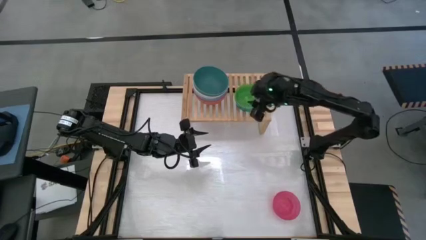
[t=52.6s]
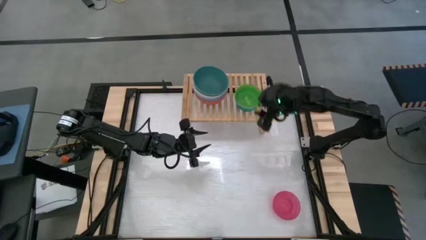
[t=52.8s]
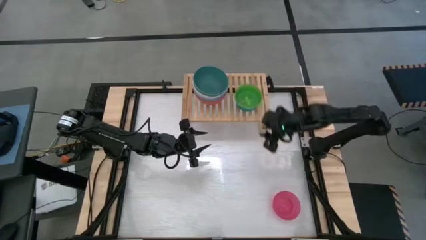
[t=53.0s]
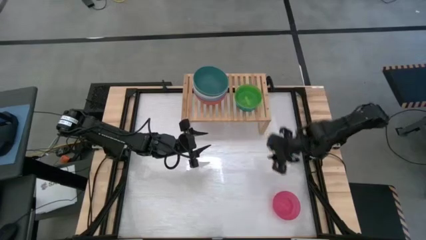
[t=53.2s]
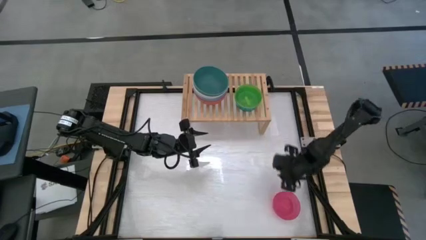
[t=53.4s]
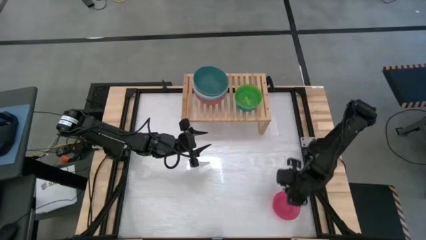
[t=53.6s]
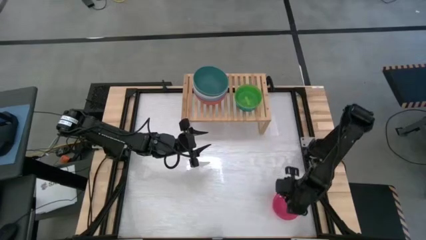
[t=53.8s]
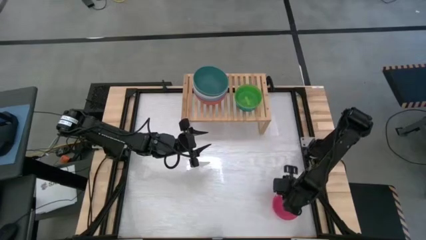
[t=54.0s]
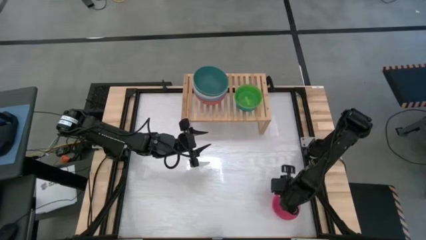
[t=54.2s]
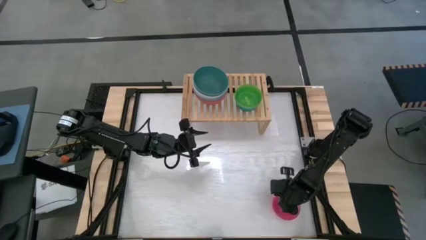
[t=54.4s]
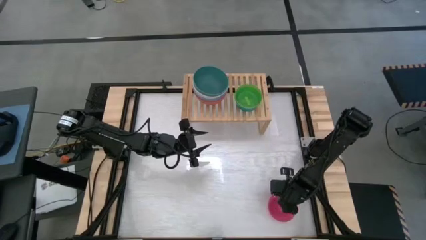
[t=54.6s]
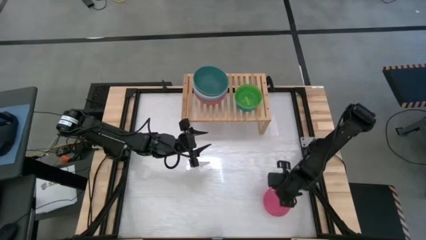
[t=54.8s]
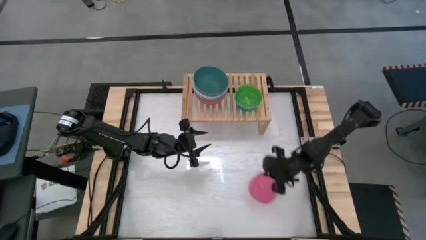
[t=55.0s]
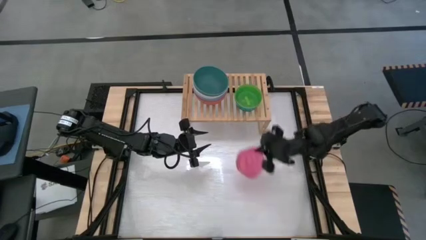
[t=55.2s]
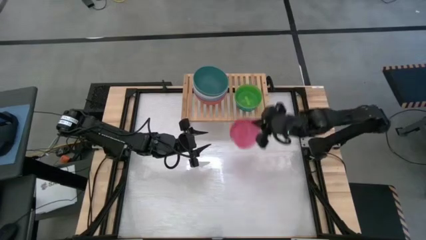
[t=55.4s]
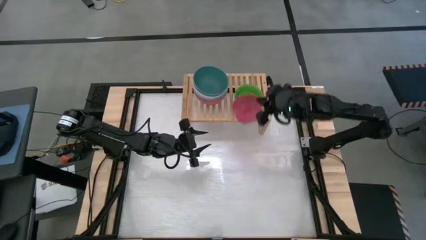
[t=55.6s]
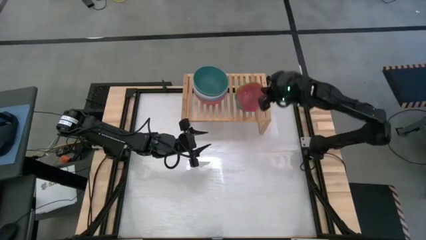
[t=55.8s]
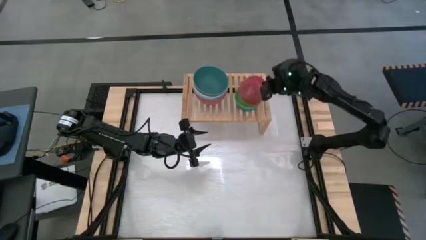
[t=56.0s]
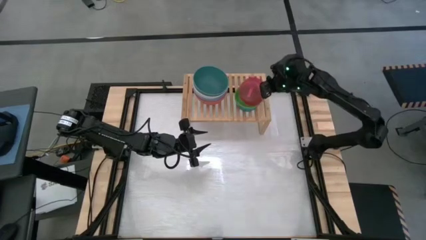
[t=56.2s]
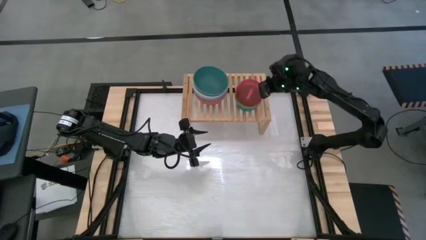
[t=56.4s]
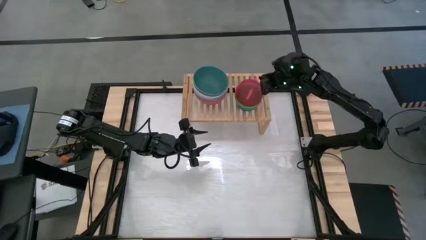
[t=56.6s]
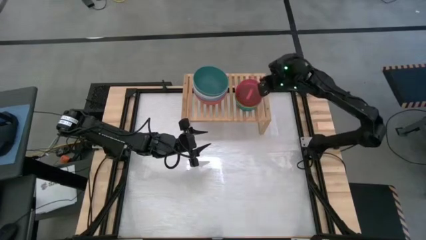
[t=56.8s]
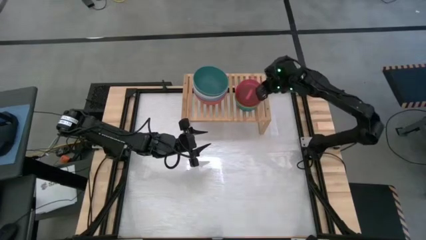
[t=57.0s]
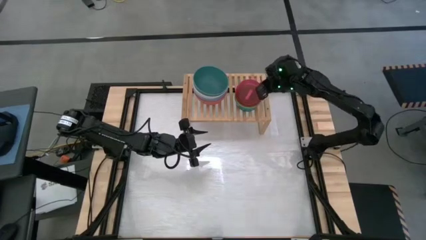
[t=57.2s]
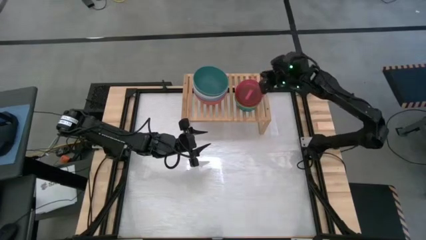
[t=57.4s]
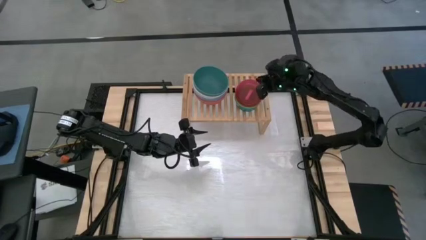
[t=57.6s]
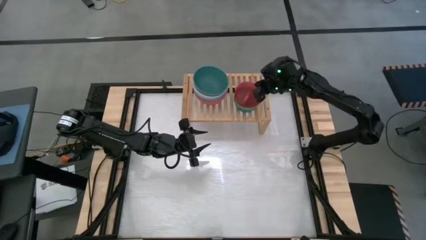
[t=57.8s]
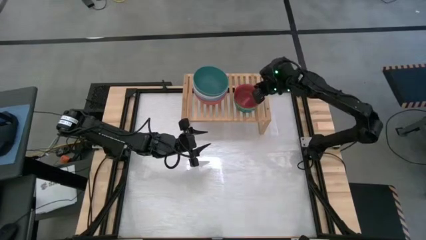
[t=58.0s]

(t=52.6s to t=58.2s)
Task: Place and stack bowls onto a shelf
Stack the small pink bowl on top of the small green bowl on the shelf

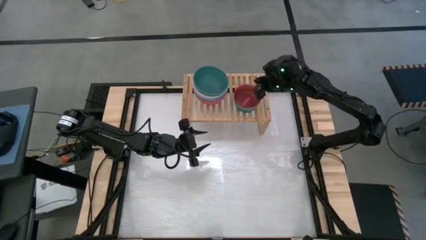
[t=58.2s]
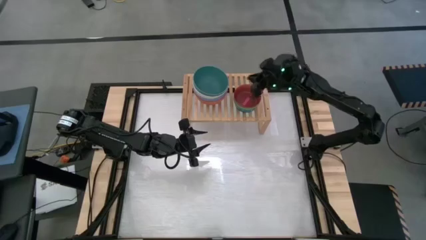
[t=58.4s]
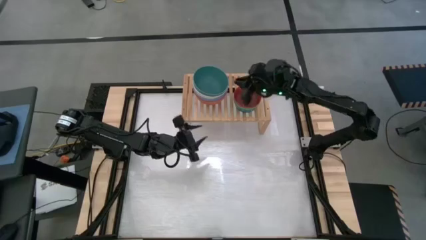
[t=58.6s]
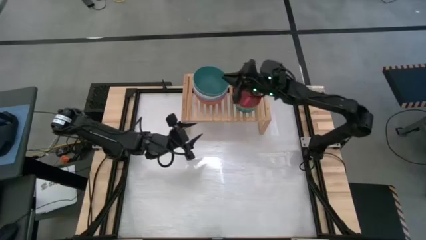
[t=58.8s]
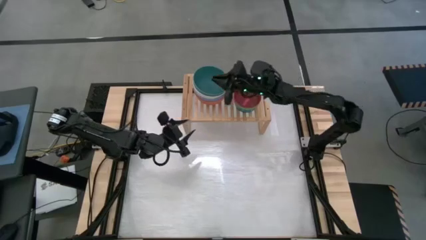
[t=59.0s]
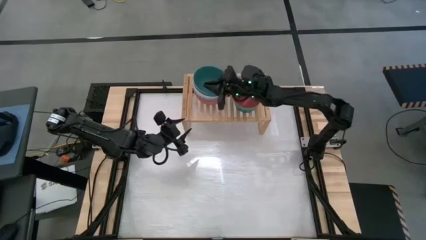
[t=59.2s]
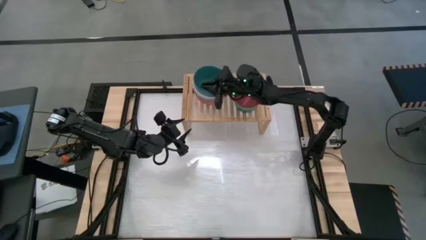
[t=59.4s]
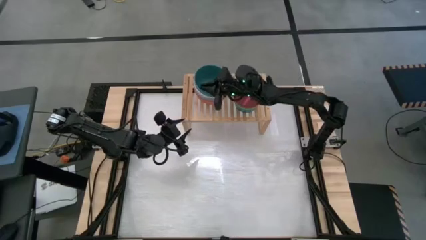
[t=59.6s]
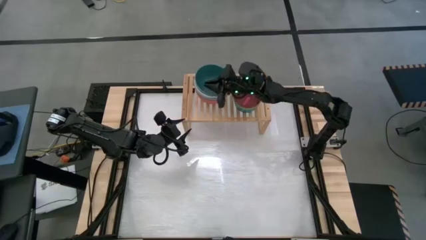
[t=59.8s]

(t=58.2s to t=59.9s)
Adjust the big stacked bowls

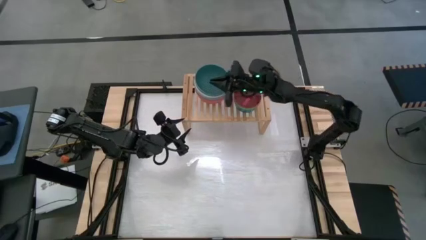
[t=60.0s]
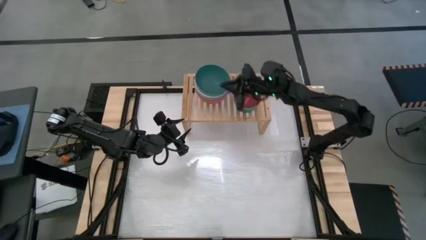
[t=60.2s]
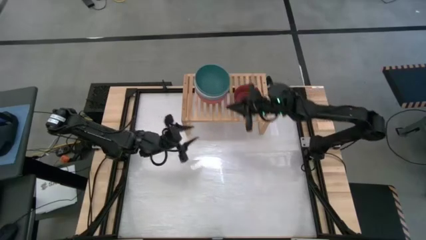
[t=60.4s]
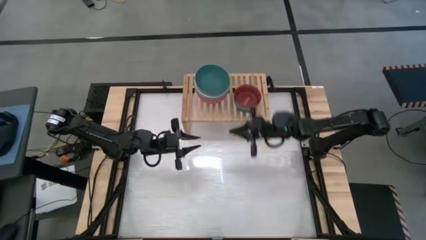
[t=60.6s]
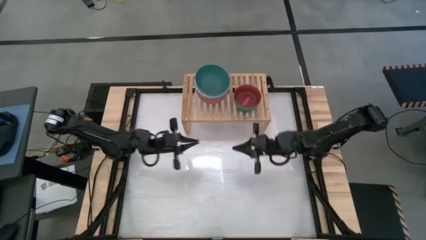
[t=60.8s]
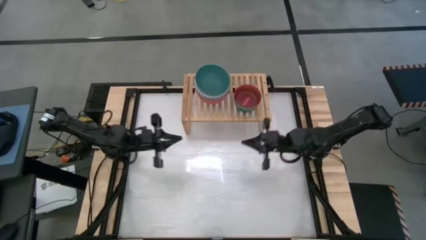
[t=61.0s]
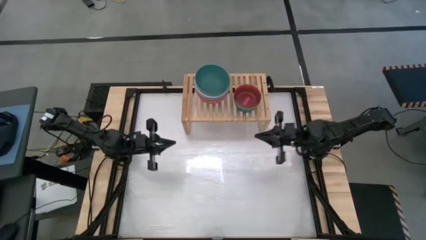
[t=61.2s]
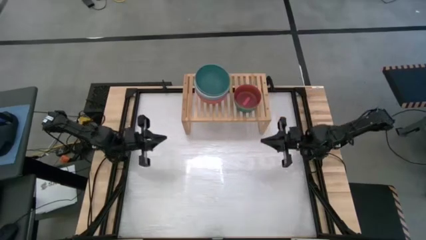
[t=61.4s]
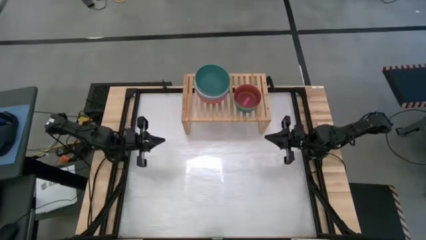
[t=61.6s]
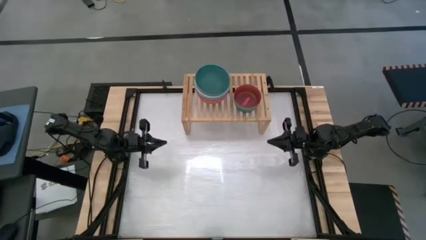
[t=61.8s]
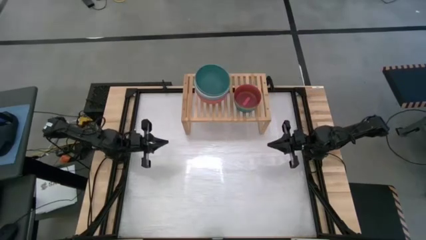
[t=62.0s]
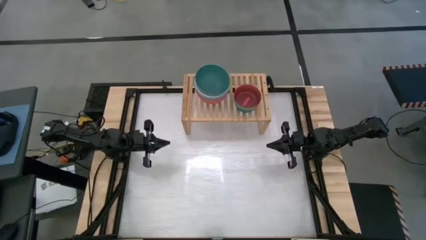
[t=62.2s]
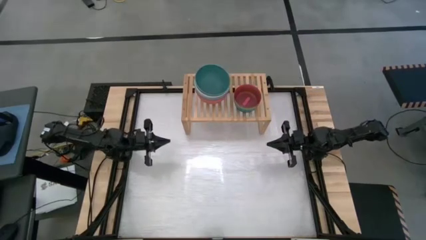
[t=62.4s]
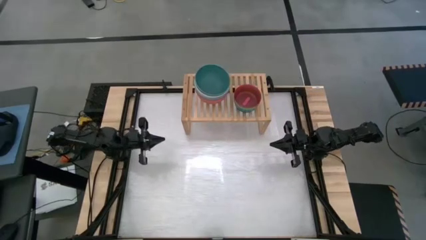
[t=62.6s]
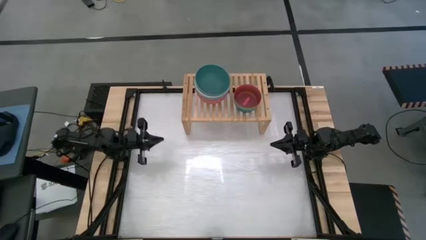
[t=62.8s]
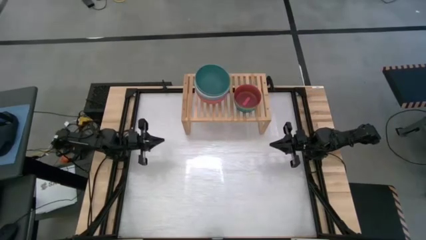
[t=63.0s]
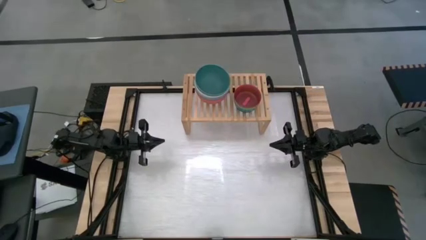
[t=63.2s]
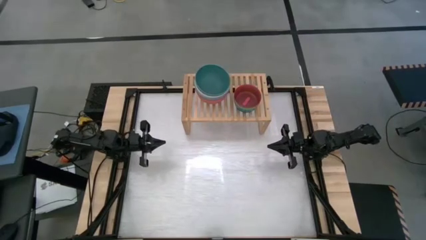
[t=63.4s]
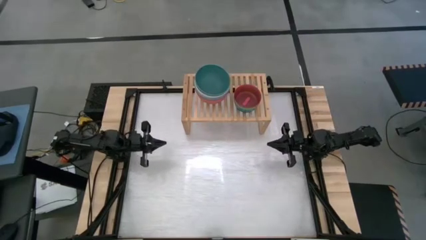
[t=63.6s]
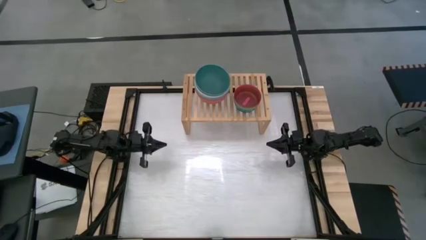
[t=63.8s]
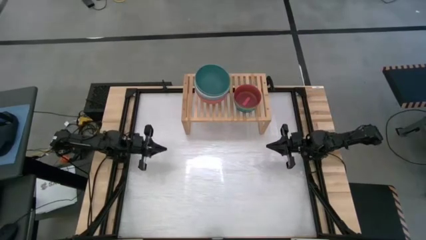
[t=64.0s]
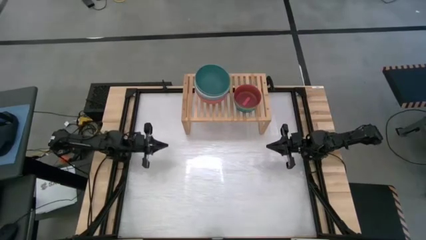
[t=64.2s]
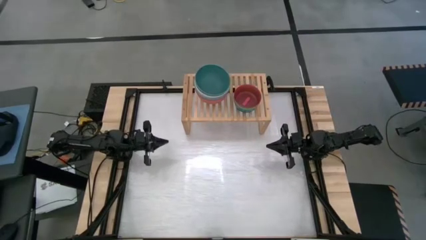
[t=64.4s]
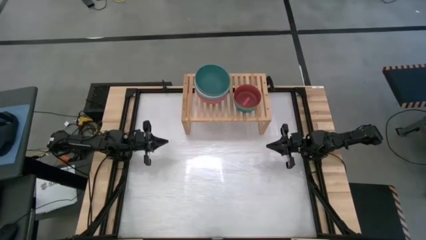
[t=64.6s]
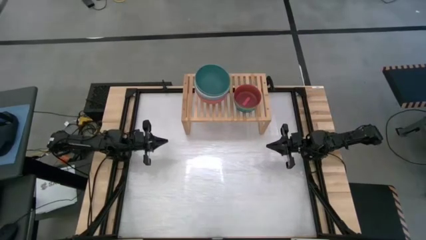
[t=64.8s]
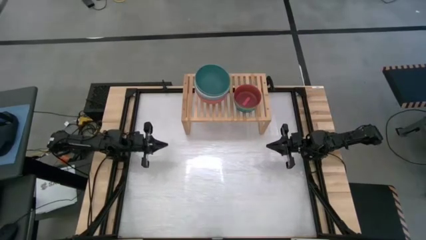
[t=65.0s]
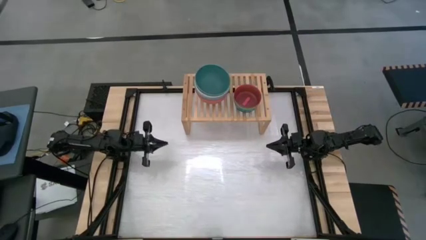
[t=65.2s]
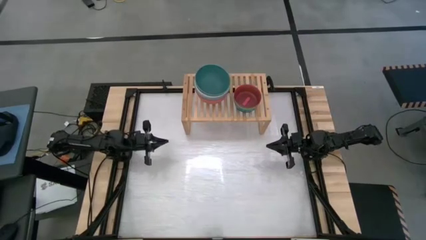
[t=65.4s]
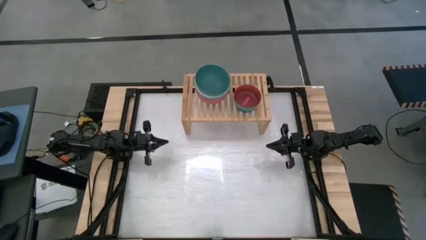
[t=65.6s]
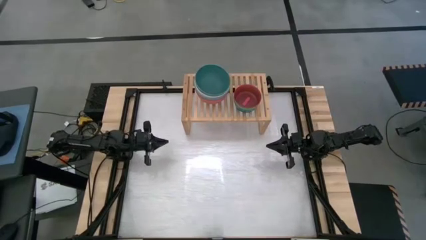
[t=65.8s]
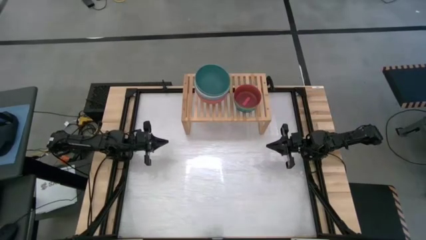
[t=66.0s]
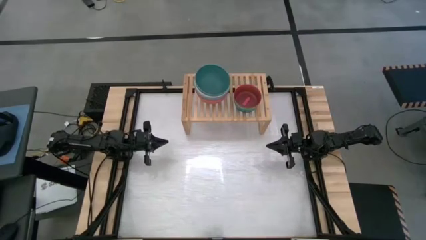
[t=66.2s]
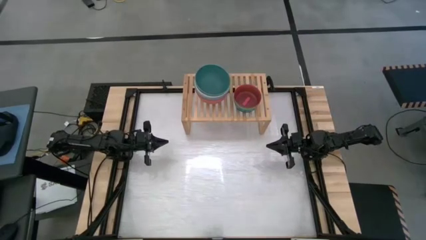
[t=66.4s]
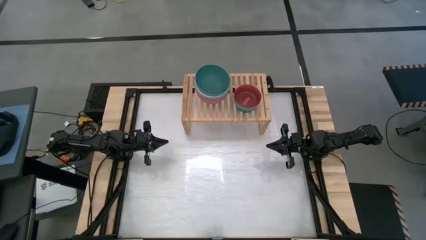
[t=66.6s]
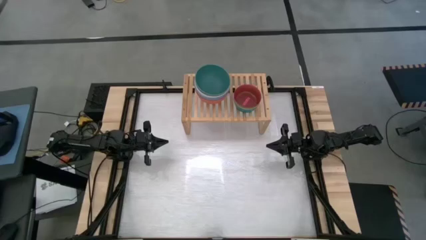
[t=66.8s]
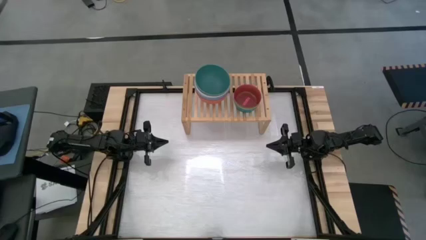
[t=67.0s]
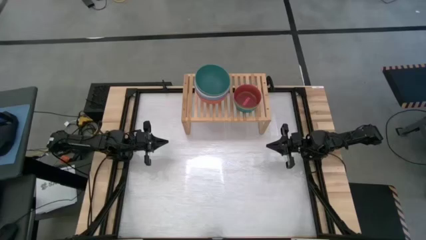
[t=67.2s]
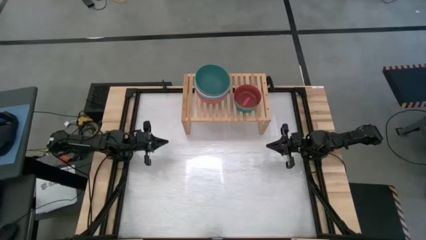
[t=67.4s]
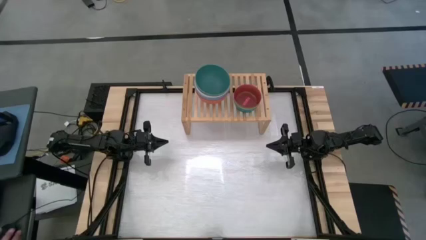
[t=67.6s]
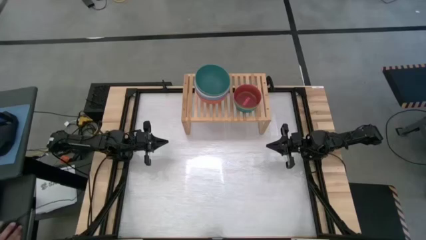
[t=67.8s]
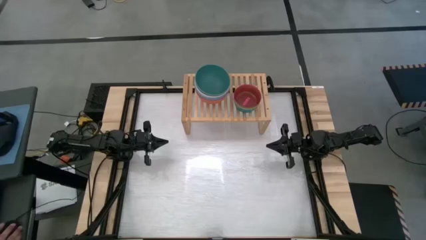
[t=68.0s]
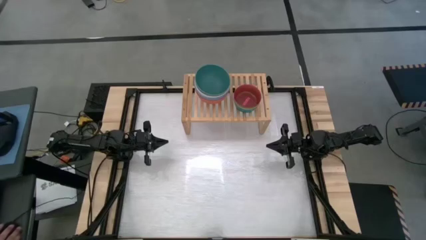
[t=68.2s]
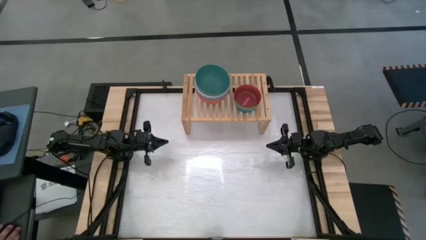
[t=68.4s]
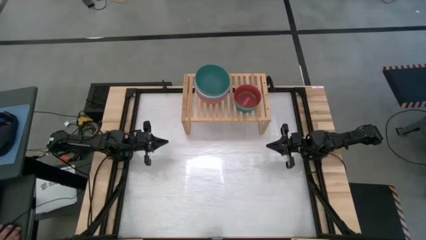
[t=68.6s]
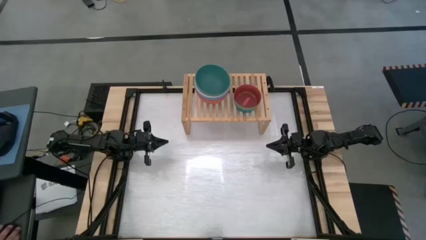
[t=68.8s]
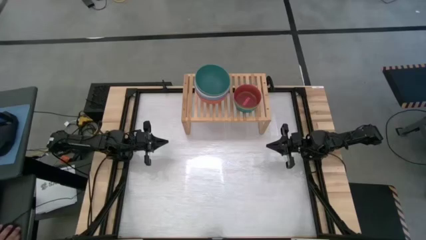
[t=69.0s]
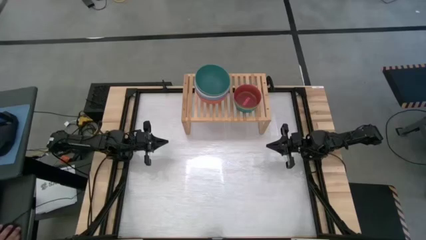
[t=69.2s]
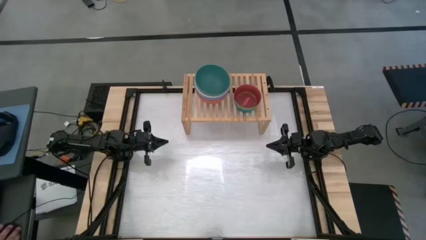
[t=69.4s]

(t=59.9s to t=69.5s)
Return to Home Position
